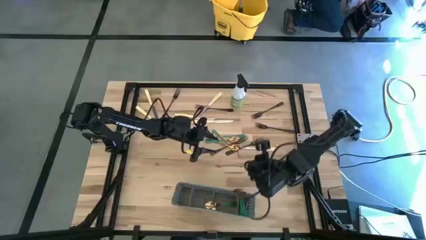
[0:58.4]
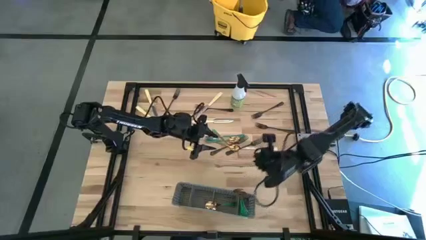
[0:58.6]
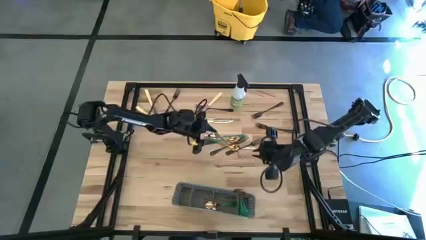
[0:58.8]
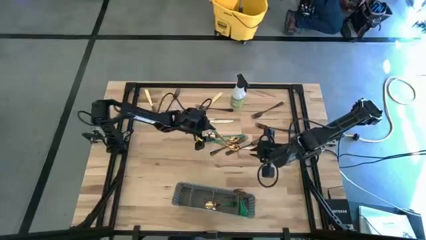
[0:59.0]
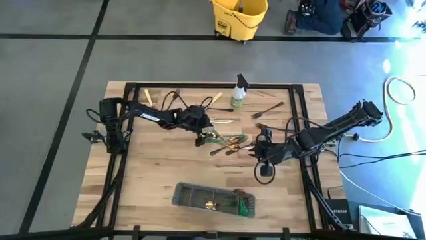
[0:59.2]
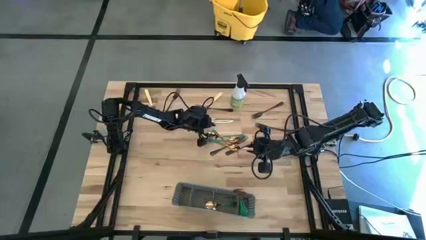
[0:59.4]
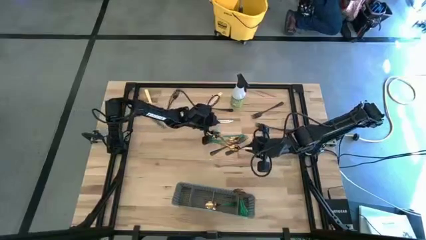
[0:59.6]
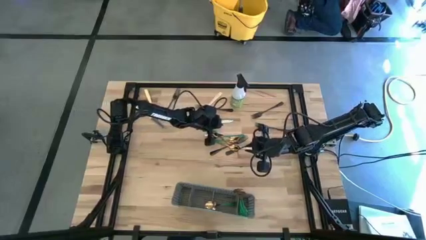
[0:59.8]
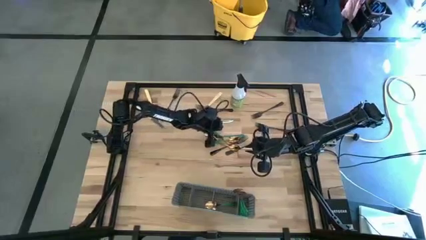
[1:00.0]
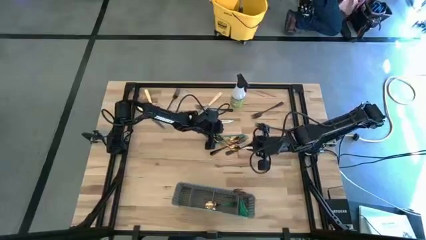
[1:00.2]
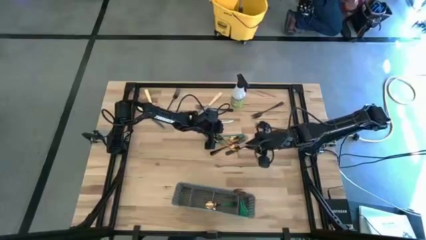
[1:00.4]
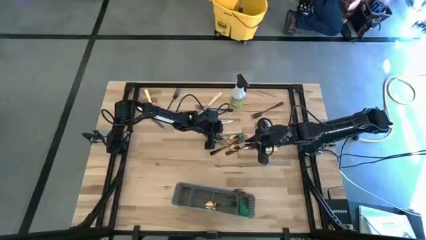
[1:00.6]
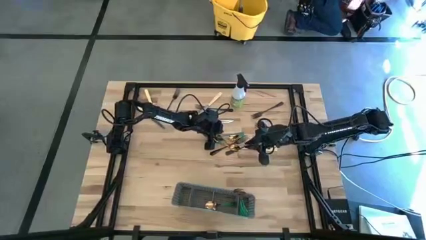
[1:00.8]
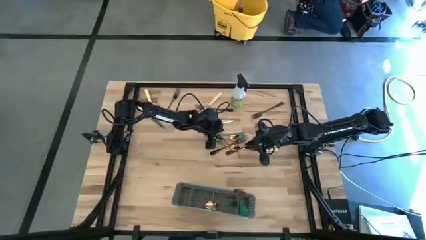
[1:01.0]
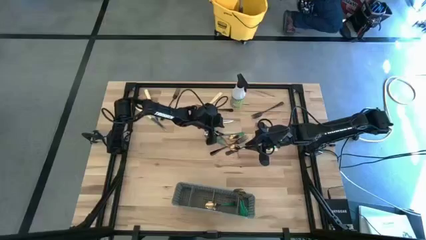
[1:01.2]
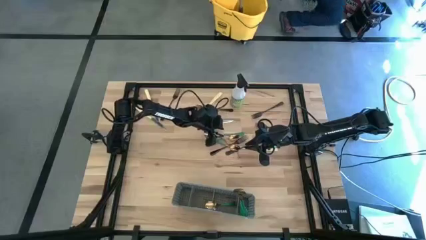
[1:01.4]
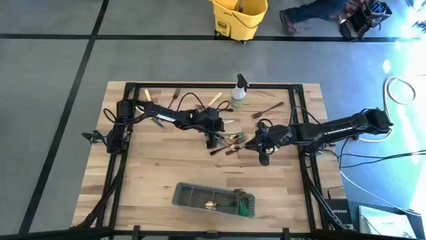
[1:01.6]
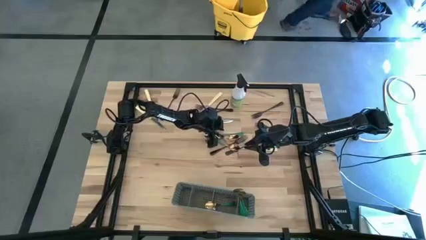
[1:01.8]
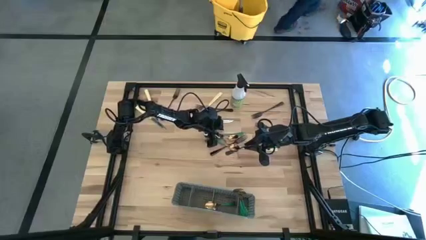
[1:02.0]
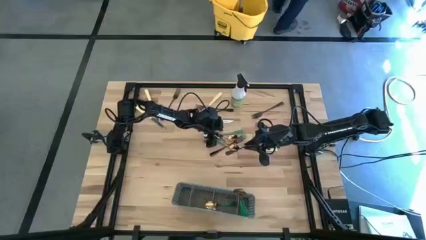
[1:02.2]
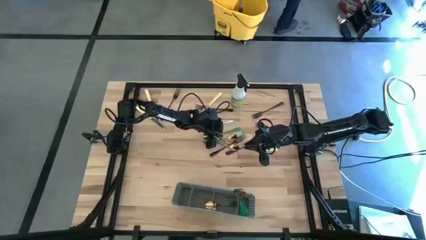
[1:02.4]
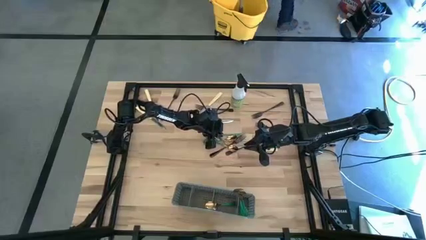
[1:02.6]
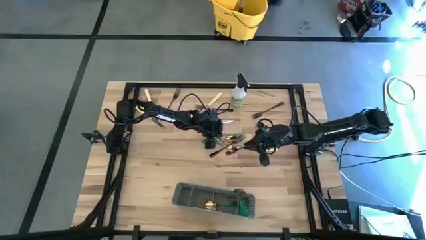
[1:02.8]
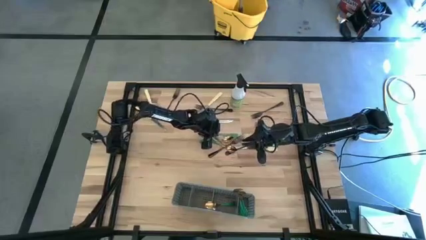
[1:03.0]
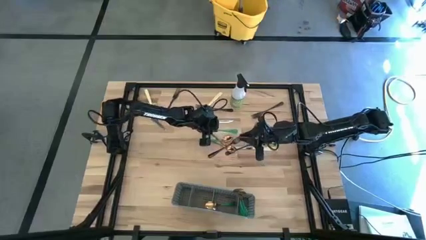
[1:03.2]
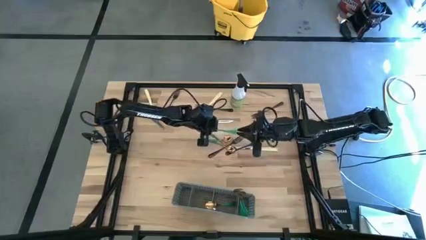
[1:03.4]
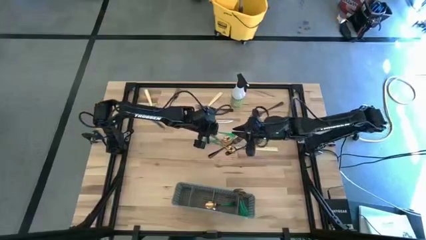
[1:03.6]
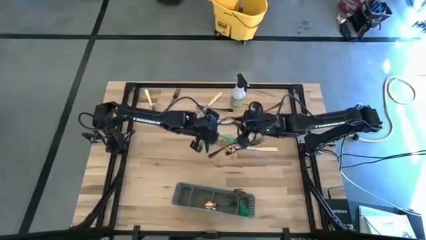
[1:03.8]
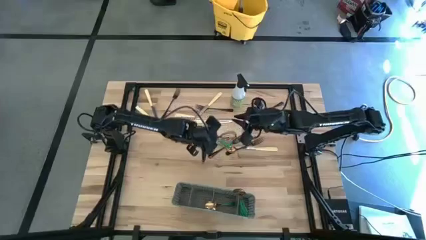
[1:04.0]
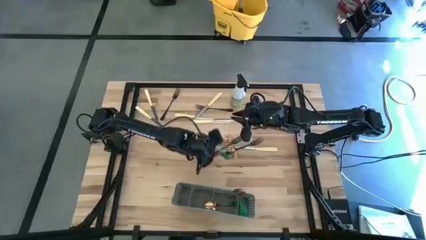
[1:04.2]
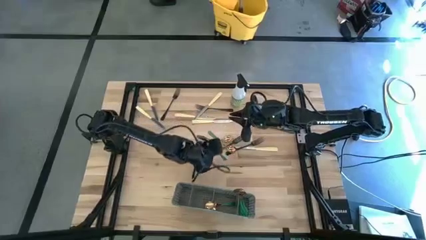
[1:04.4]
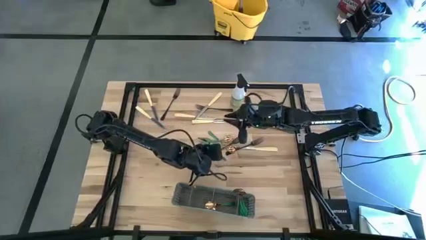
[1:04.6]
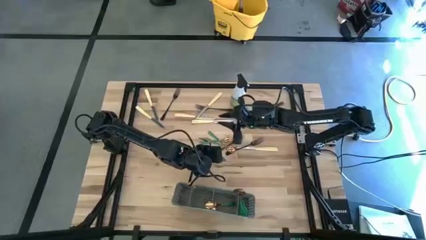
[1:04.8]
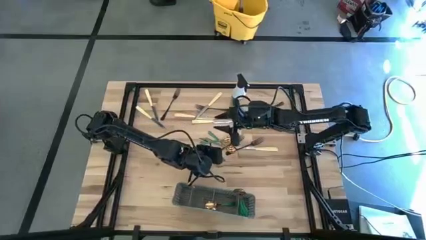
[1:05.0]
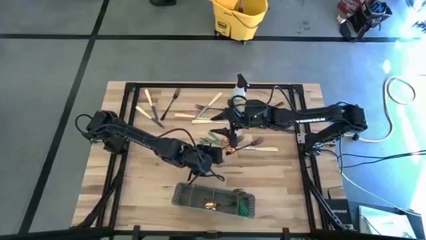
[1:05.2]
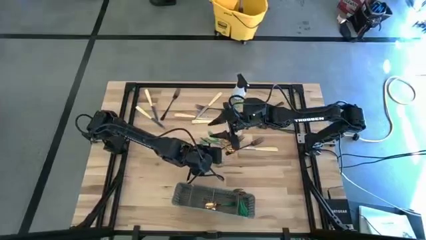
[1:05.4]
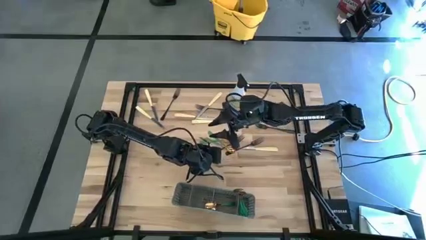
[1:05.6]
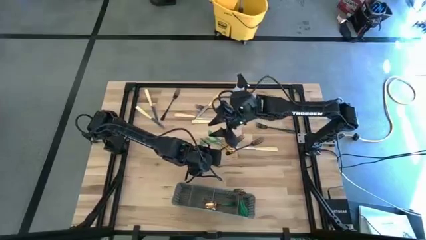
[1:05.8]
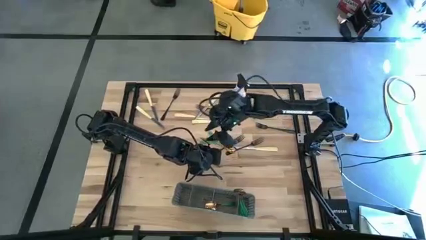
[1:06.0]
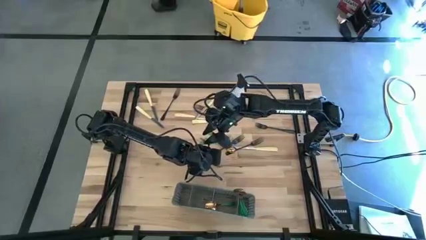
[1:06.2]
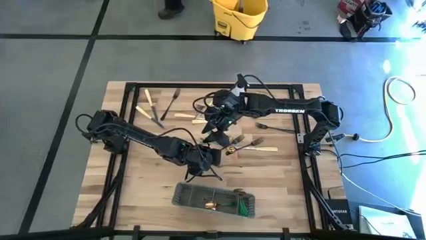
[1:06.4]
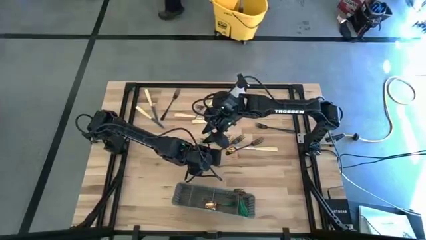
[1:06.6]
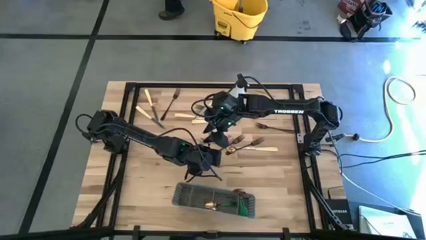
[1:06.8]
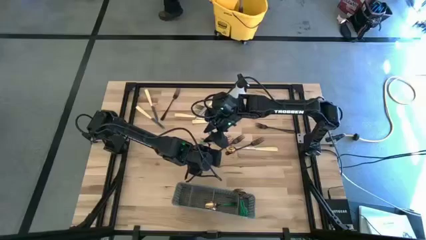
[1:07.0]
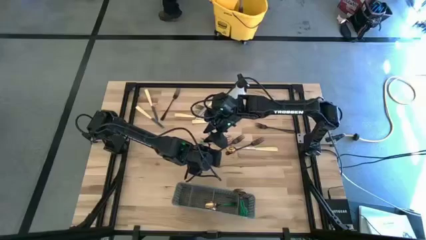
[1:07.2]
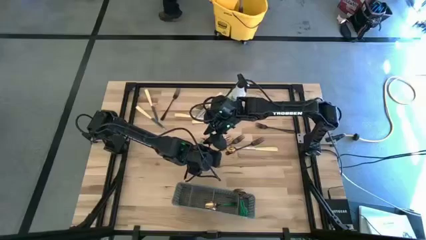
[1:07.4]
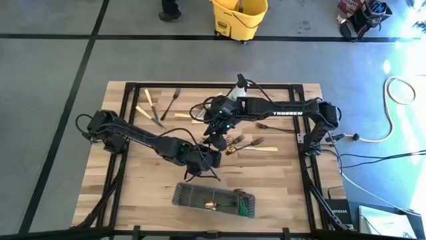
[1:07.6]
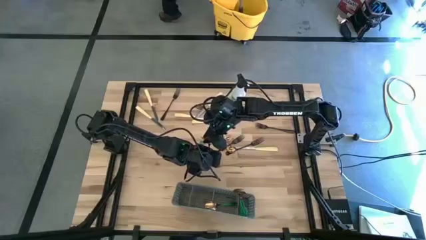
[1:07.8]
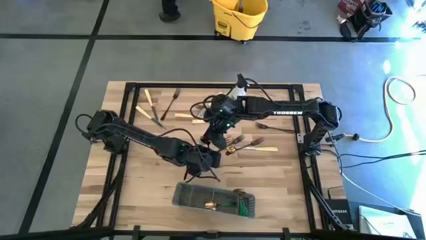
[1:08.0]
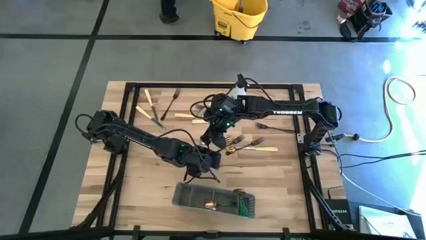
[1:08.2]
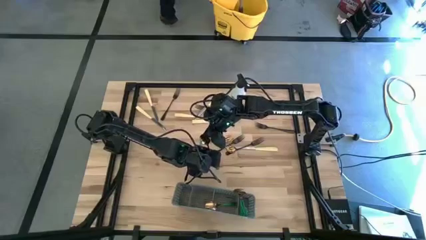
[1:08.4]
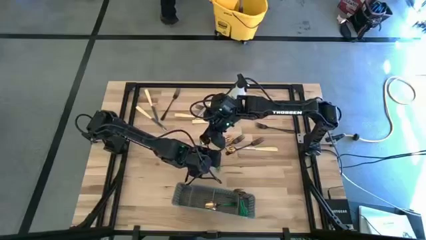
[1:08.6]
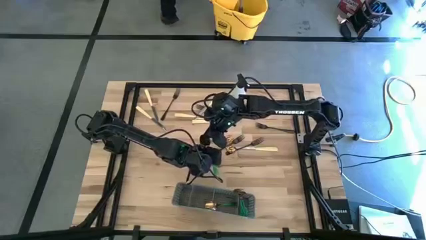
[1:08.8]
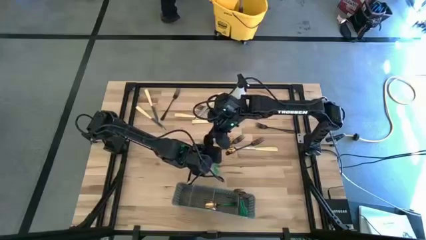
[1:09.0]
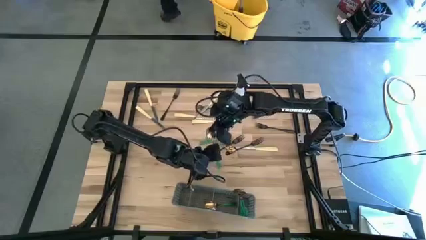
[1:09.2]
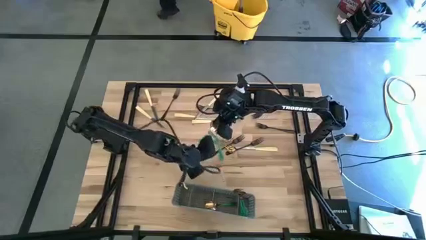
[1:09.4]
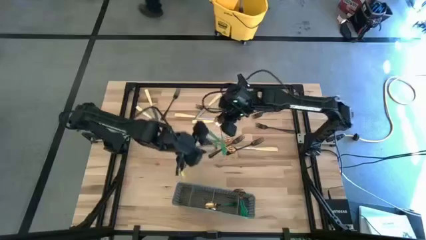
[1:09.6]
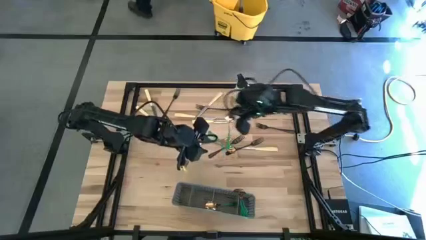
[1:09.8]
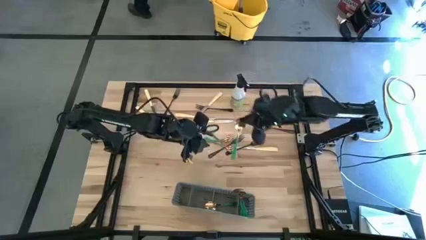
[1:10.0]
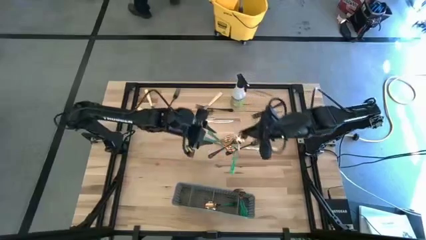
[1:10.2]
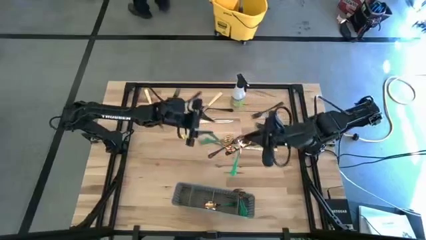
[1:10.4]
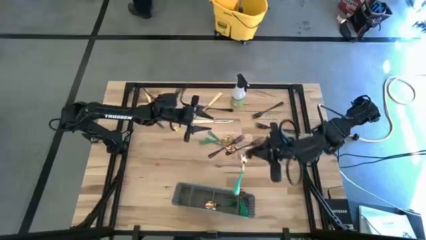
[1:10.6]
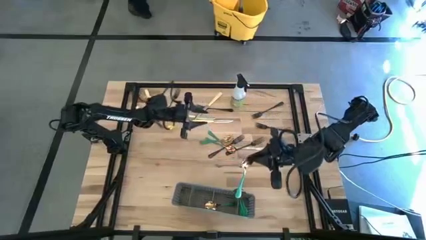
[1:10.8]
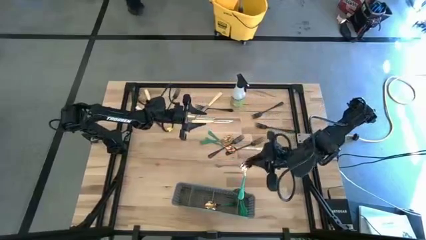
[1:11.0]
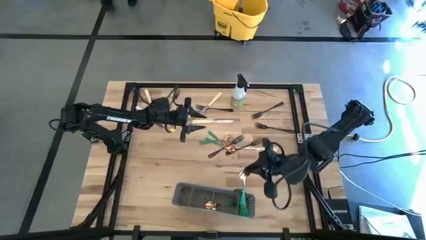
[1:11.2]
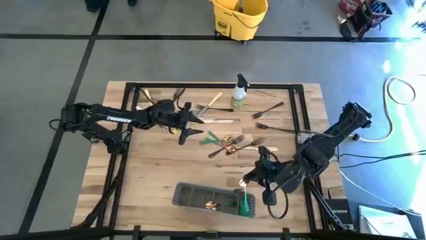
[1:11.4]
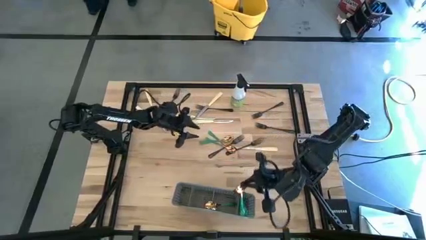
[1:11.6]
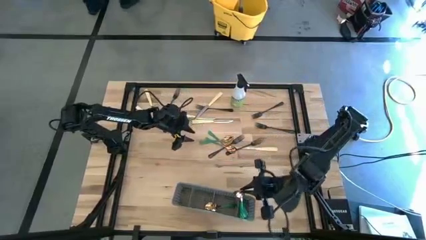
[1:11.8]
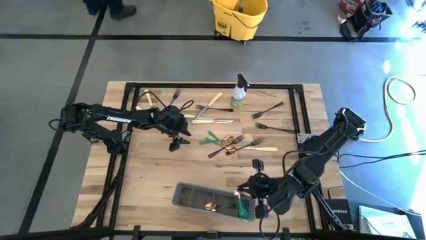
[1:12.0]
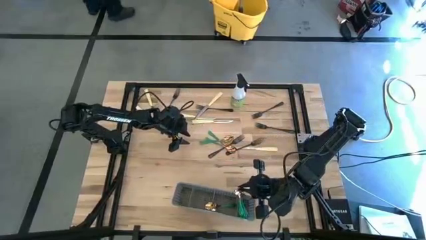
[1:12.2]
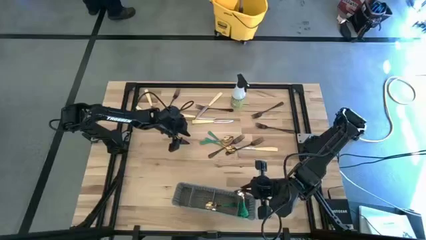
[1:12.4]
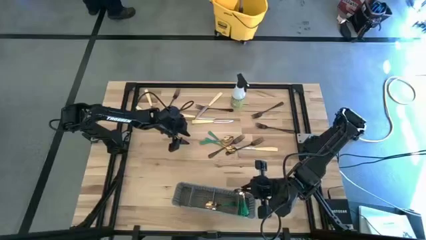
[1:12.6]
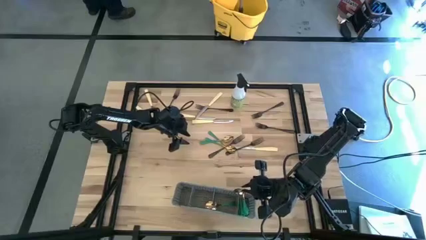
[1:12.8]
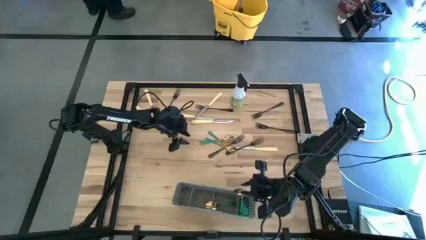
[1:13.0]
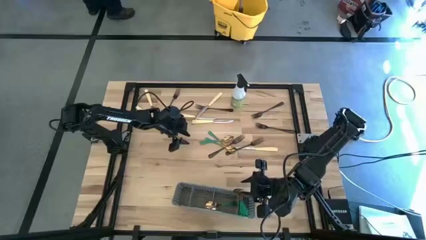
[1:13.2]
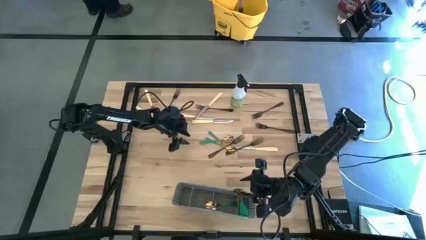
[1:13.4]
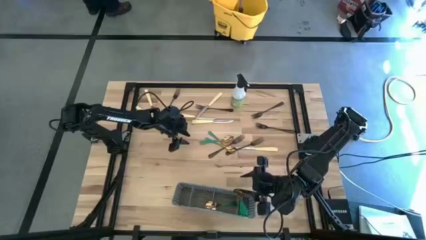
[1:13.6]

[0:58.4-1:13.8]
Task: Sort silverware
Put the top green spoon into the gray cutlery rack
